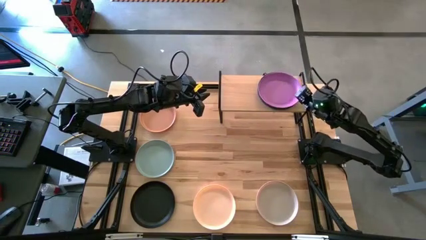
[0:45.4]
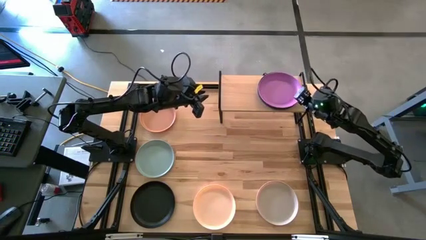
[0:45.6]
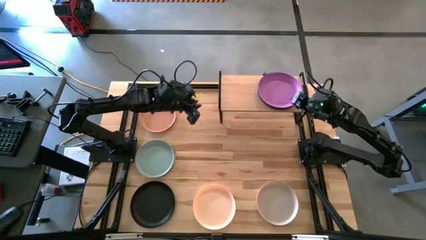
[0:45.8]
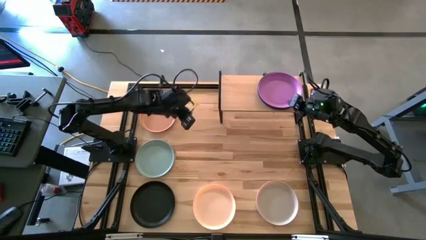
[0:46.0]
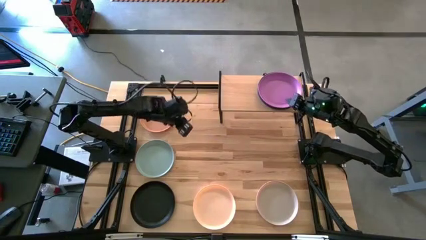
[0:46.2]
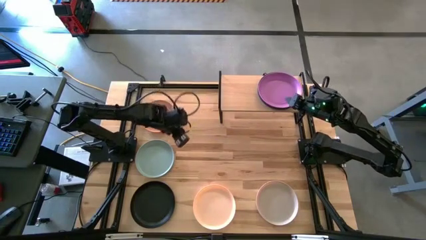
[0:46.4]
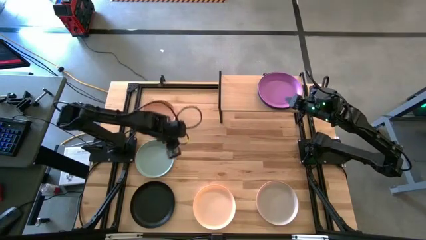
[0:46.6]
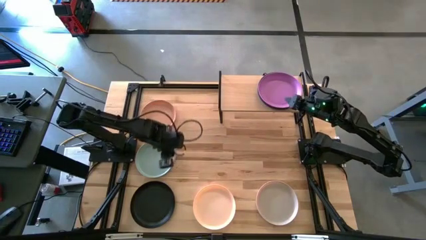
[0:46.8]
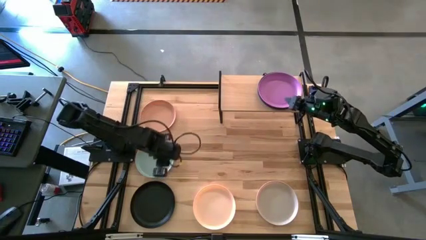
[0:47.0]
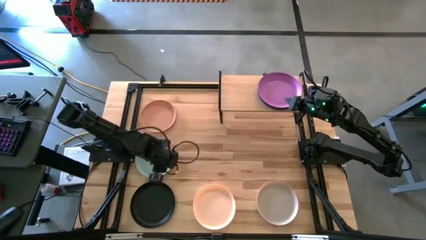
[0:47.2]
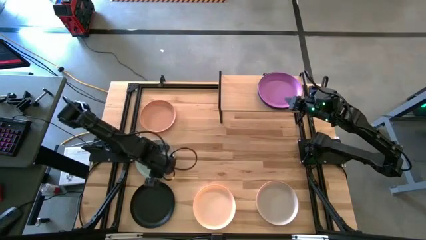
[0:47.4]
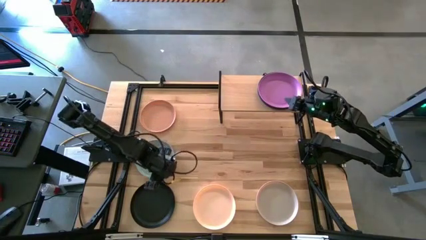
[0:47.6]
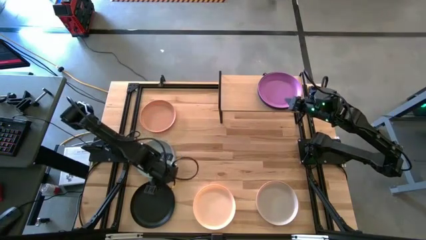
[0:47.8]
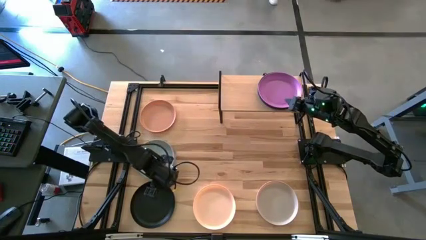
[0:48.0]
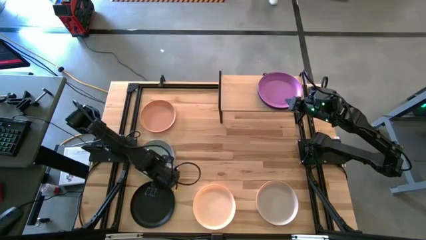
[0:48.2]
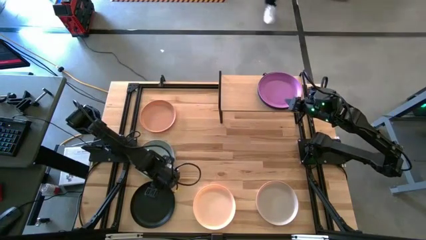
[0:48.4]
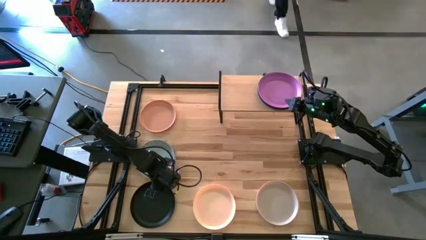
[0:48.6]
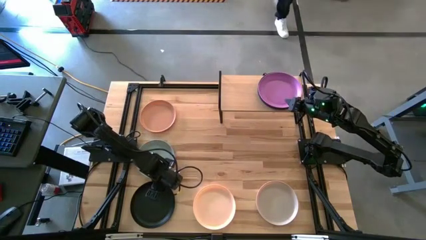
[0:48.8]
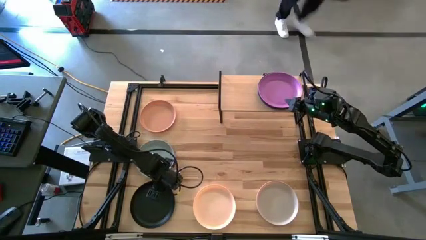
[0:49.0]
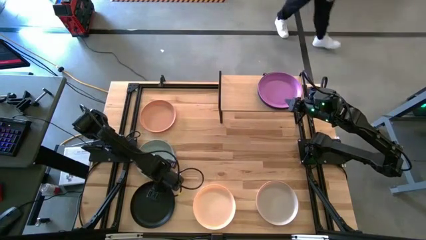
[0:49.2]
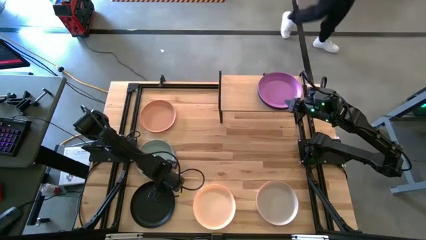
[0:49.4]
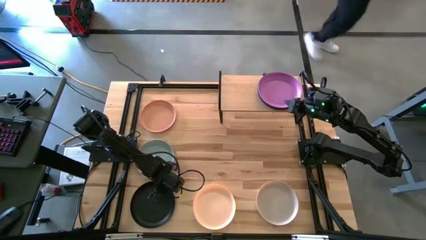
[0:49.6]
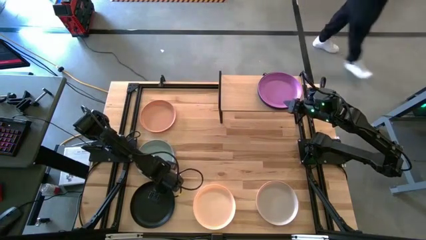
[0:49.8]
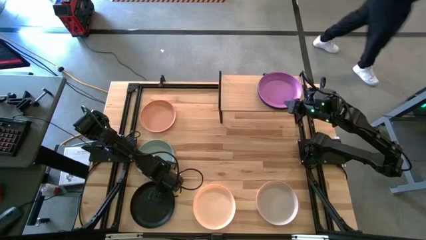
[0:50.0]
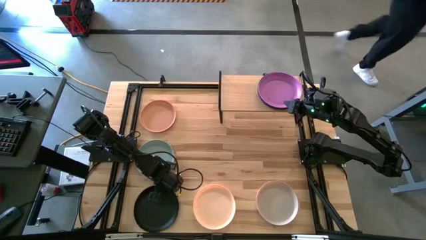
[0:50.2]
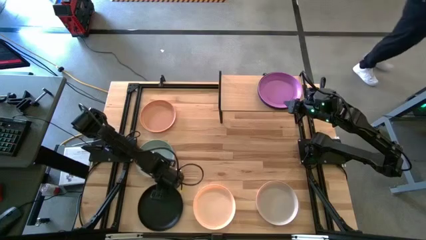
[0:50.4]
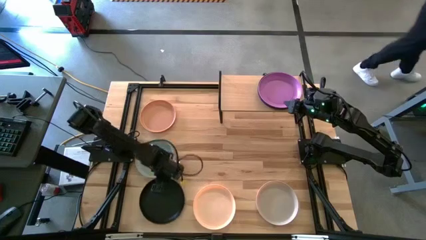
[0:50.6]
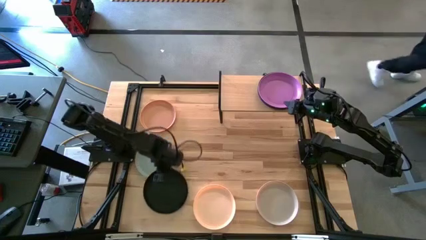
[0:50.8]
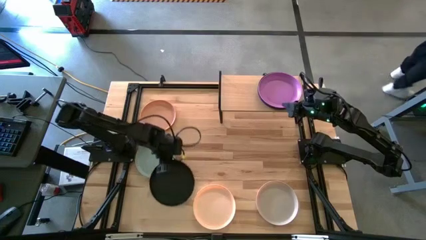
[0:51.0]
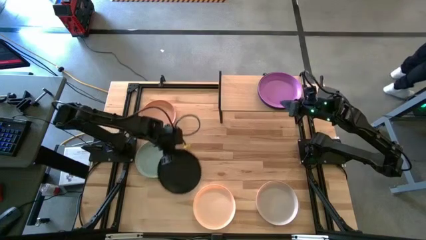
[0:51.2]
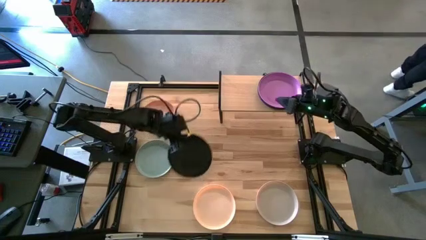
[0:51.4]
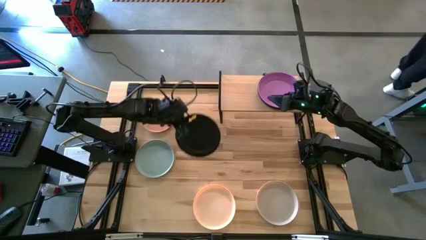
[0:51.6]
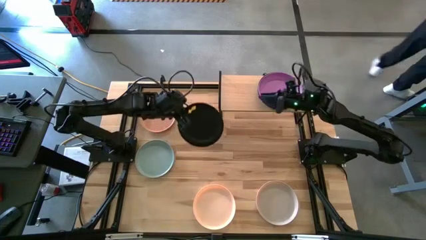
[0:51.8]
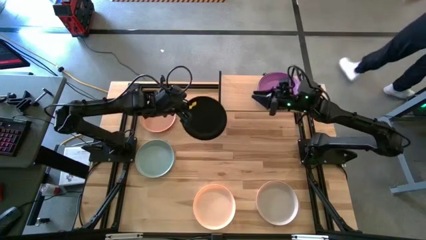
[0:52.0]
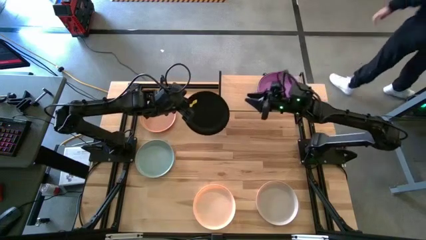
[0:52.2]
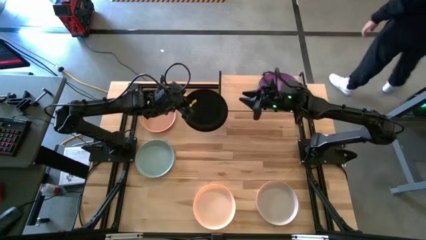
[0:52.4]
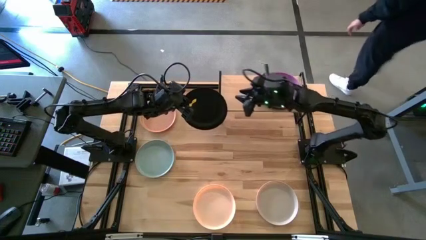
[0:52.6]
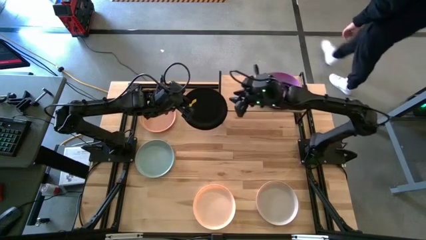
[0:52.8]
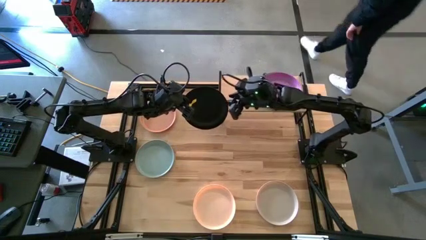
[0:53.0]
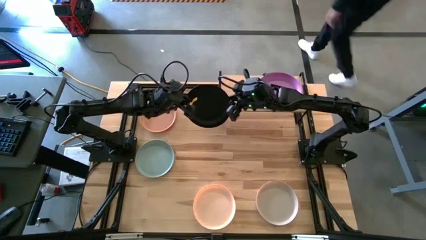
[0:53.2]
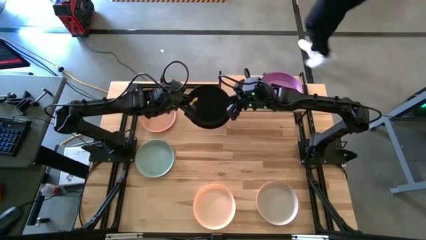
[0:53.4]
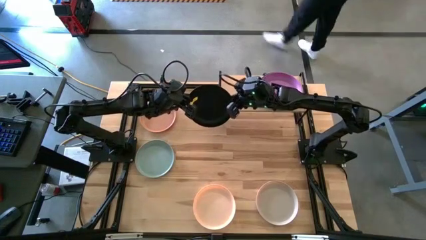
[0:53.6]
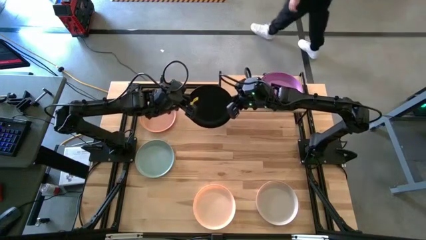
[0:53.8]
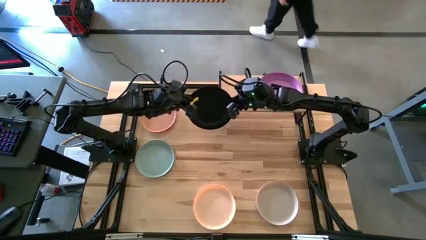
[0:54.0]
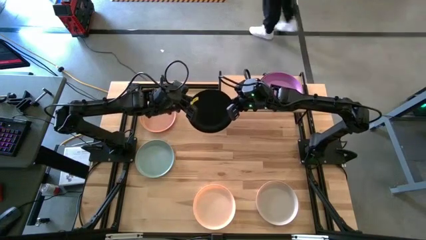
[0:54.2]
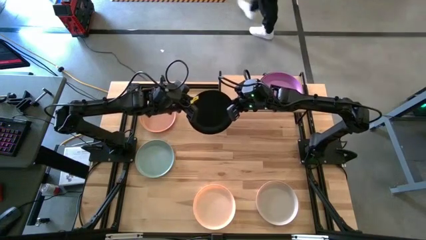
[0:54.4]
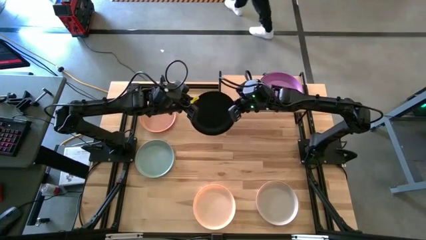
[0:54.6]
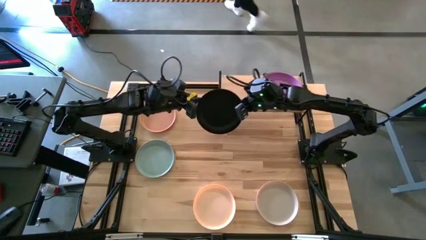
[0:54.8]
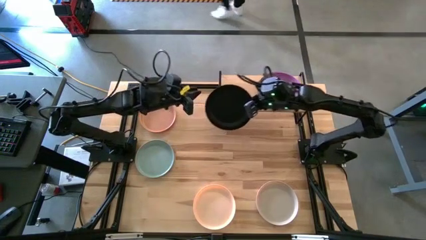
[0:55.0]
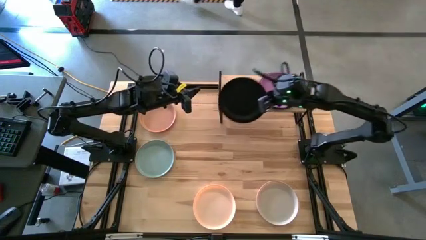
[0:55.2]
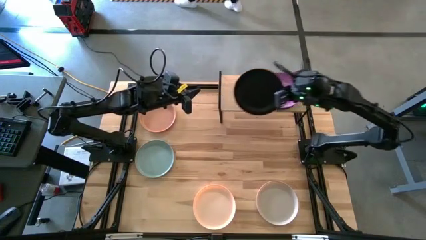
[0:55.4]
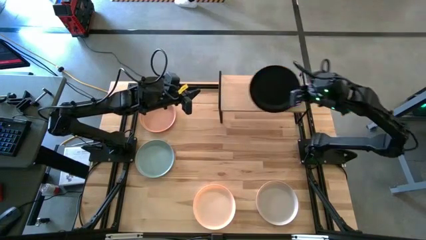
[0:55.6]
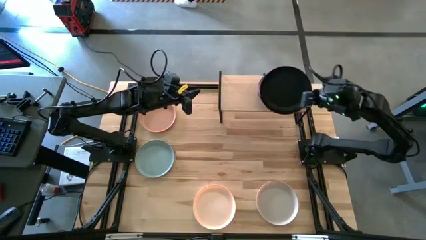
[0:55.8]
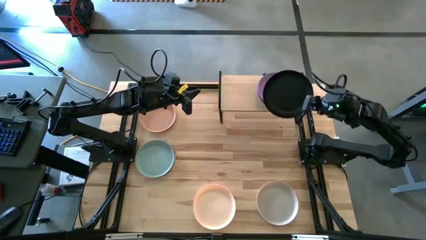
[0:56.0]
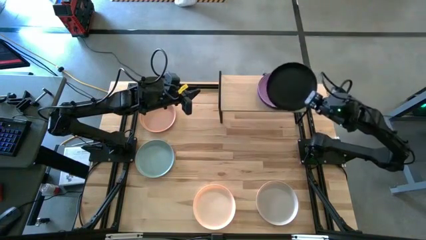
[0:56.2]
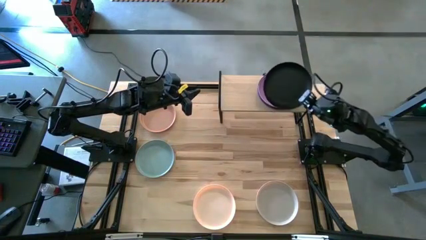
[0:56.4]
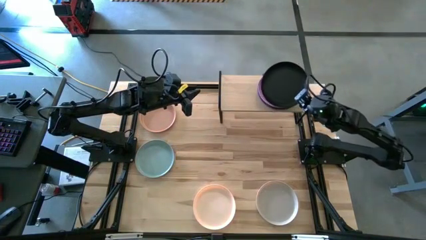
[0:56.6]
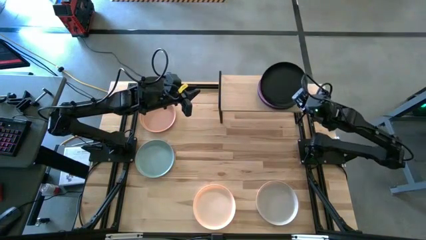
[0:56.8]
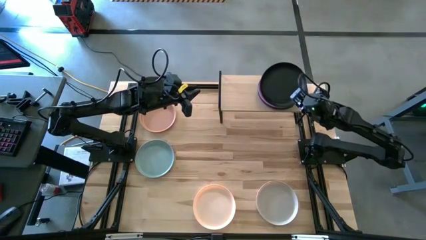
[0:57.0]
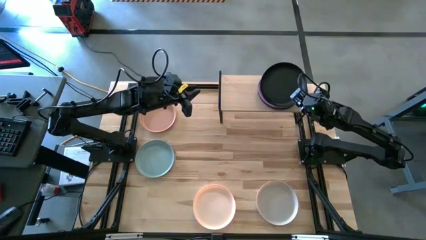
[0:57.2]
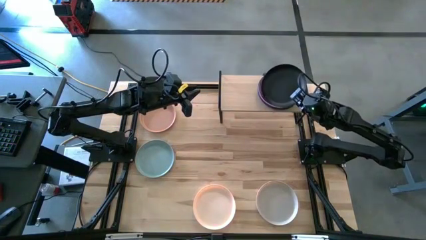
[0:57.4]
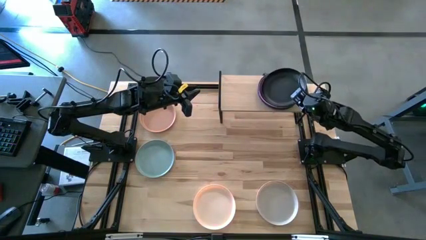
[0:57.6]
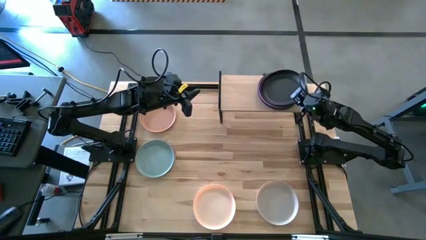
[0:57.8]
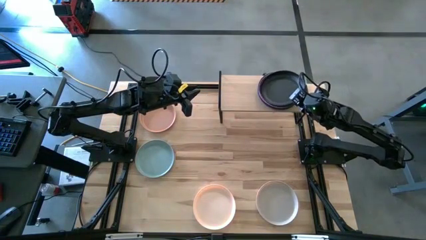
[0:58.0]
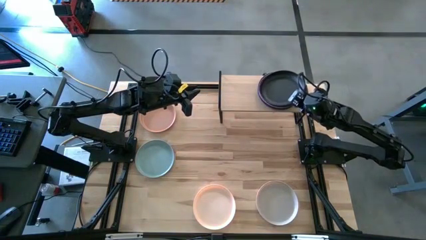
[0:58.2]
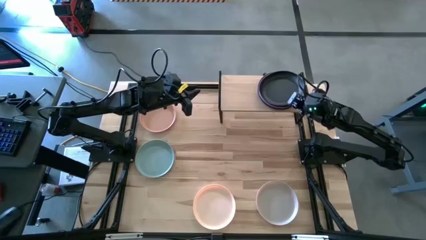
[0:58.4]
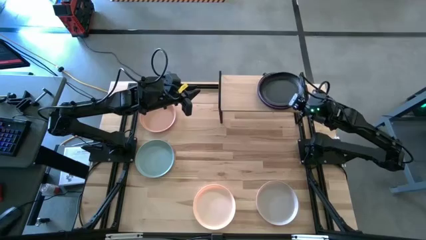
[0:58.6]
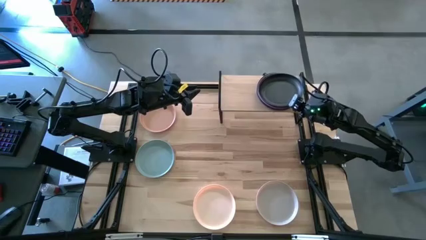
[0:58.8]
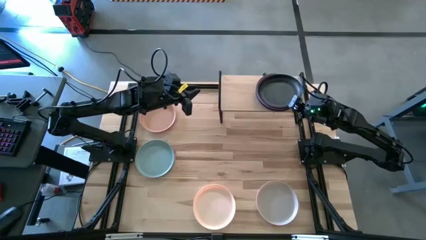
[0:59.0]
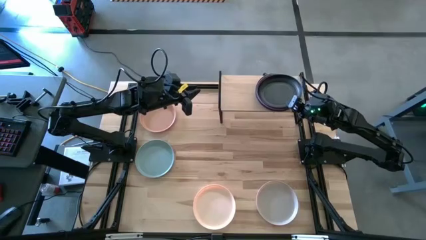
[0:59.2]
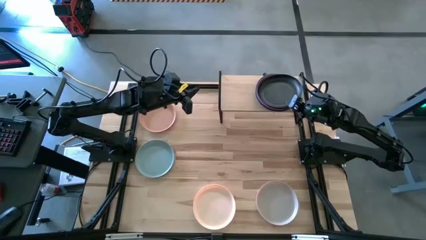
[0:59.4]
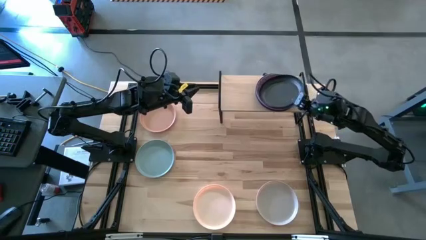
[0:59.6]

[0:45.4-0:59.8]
Task: Place and stack plates onto a shelf
Stack the black plate on top of the purple plate on the shelf

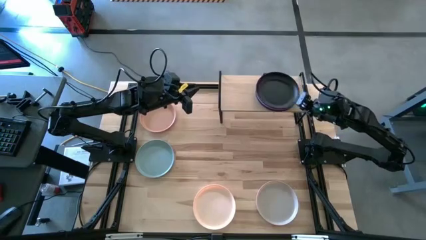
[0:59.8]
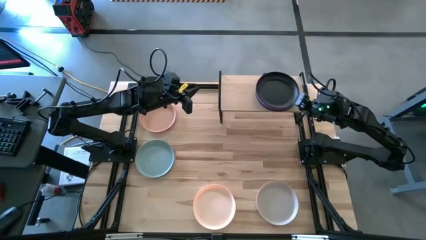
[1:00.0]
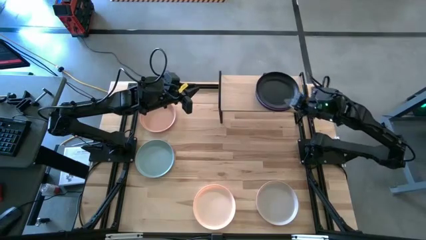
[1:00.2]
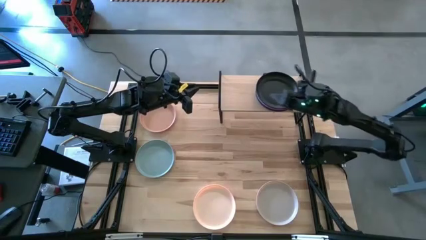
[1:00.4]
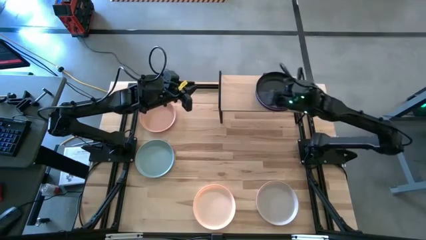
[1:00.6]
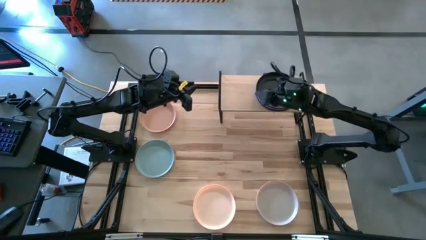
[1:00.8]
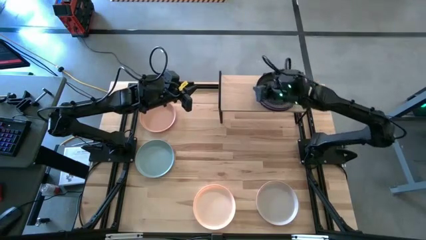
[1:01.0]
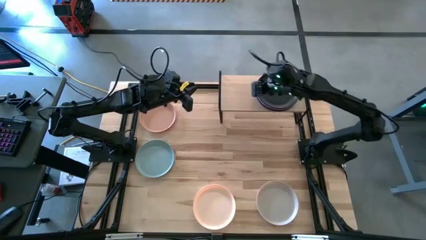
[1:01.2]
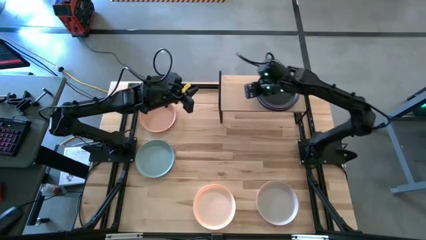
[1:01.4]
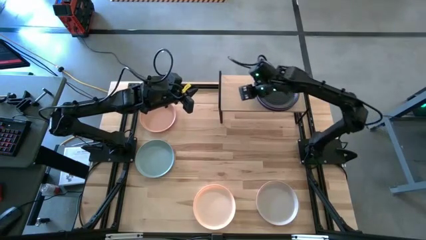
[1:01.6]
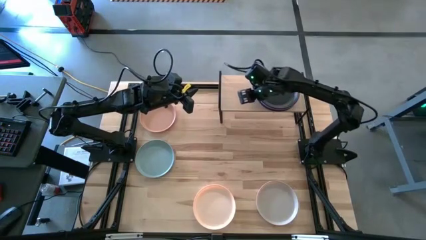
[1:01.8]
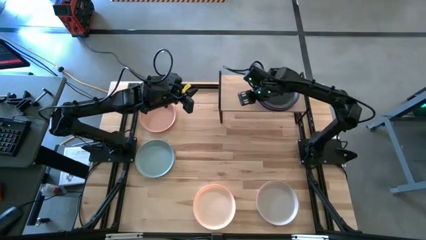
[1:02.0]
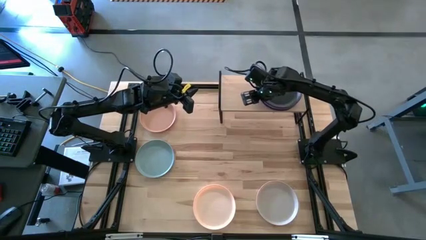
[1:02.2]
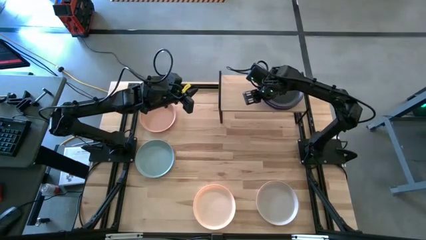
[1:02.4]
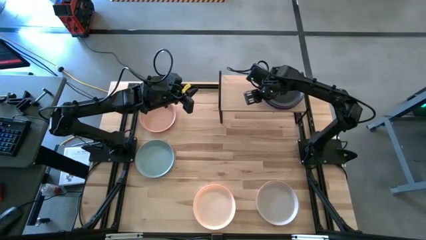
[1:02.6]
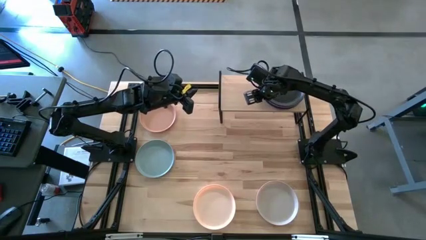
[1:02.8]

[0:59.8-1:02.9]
Adjust the plates on the shelf
